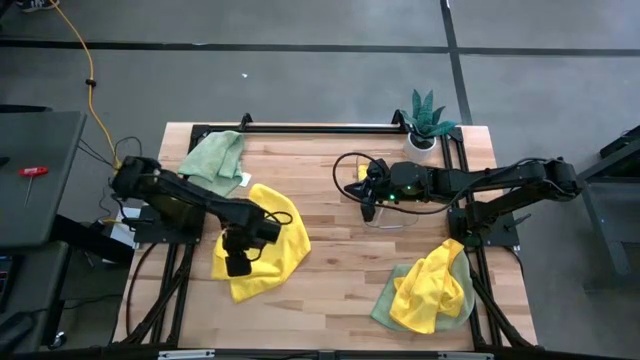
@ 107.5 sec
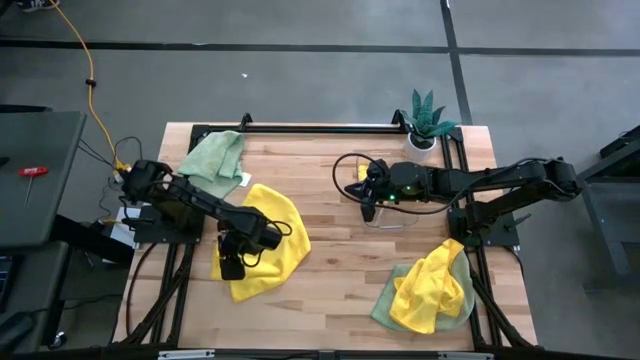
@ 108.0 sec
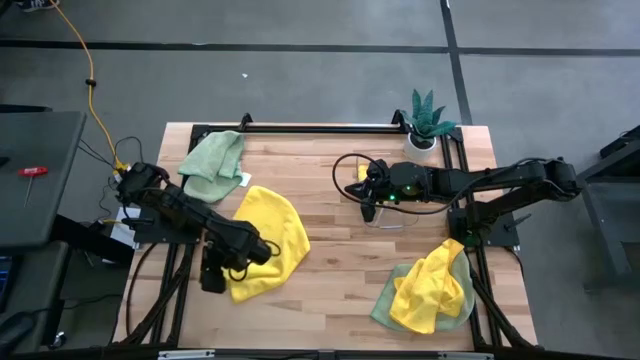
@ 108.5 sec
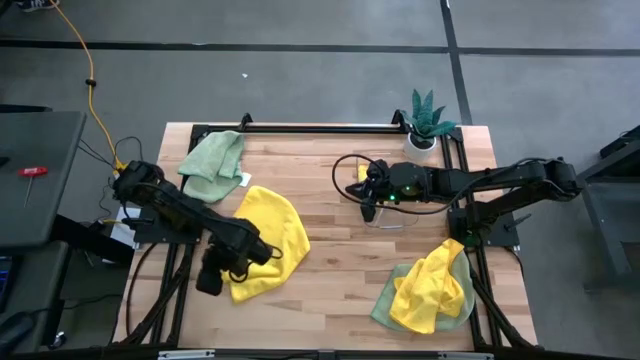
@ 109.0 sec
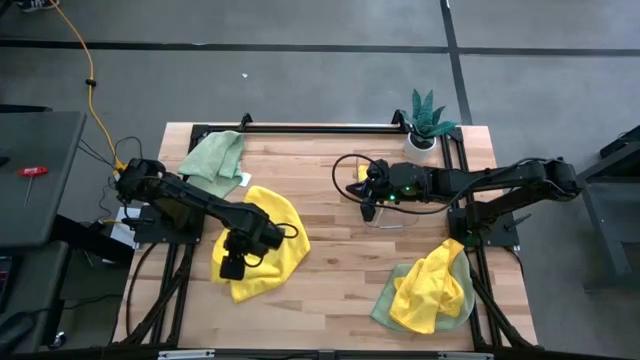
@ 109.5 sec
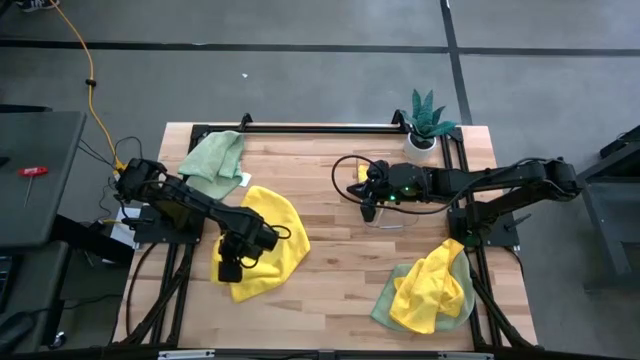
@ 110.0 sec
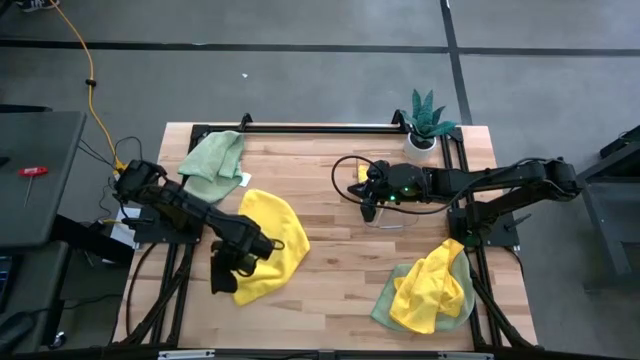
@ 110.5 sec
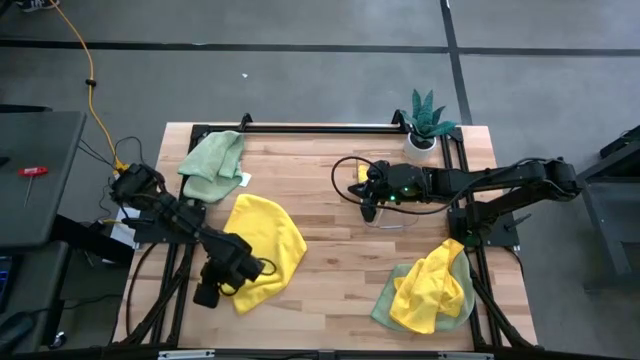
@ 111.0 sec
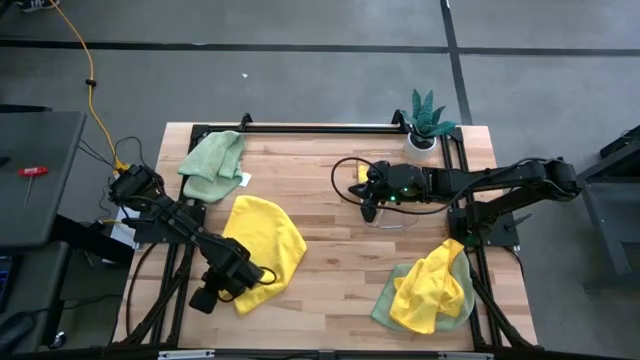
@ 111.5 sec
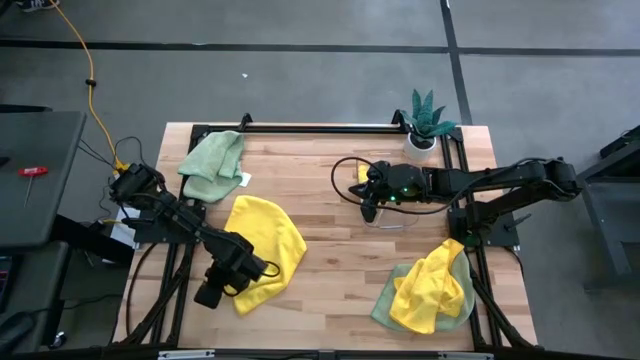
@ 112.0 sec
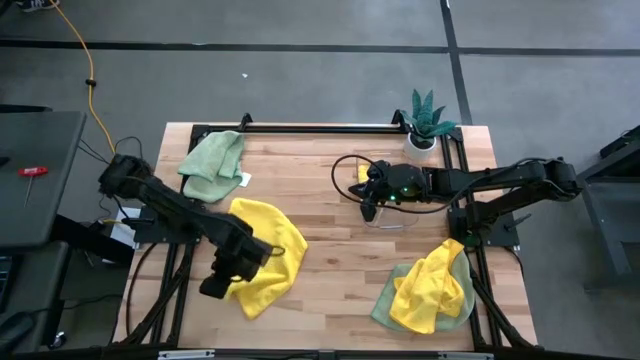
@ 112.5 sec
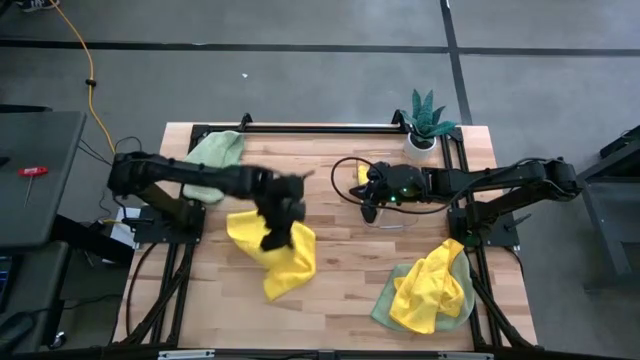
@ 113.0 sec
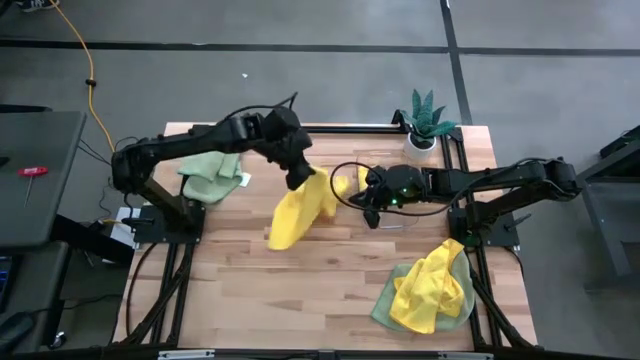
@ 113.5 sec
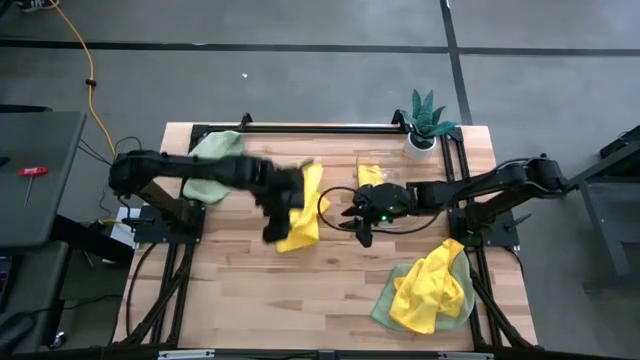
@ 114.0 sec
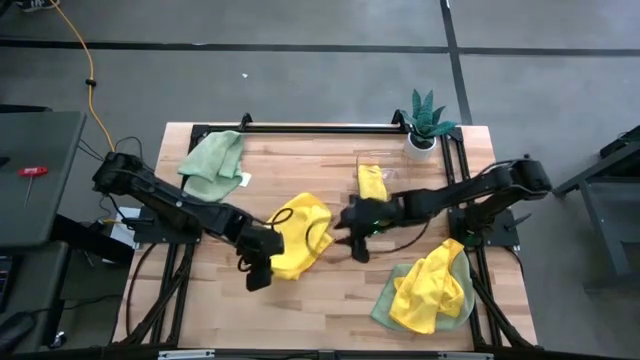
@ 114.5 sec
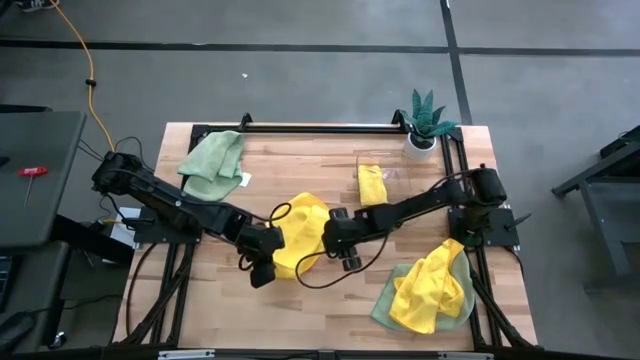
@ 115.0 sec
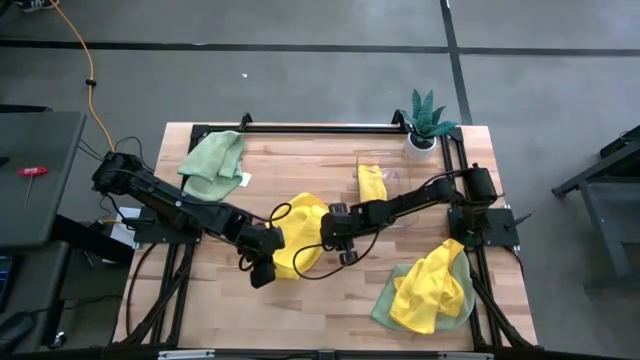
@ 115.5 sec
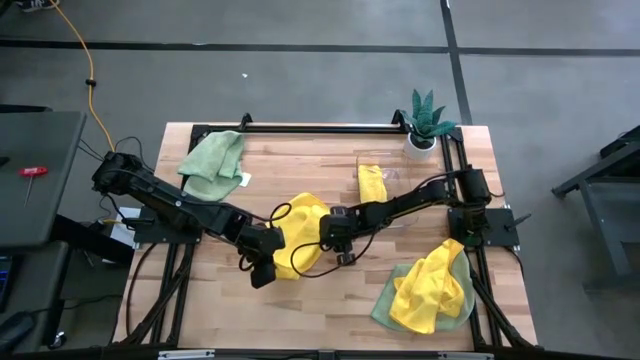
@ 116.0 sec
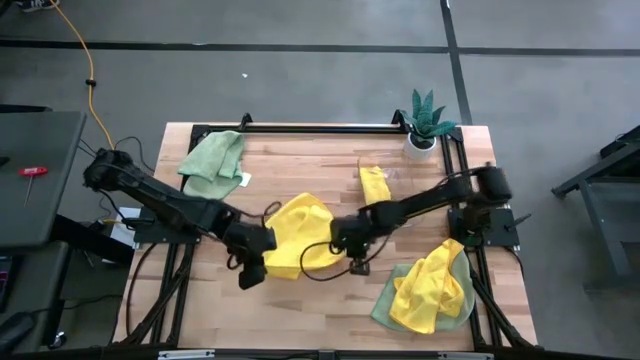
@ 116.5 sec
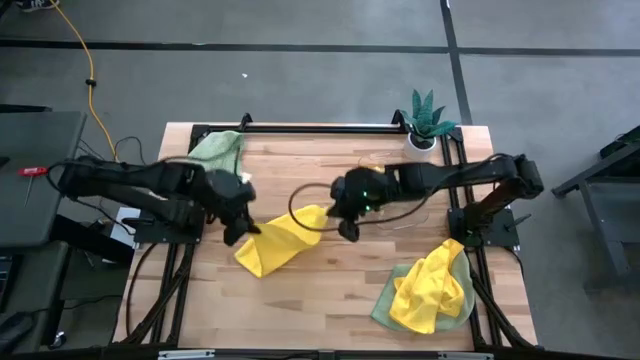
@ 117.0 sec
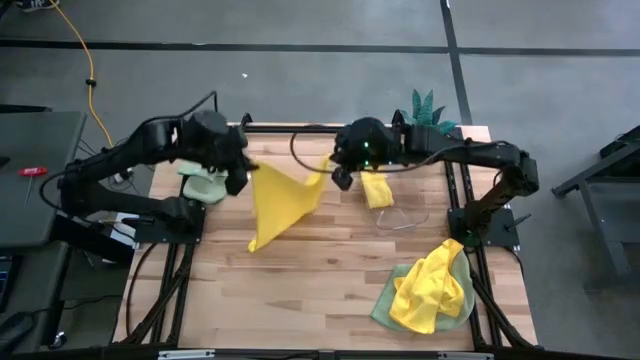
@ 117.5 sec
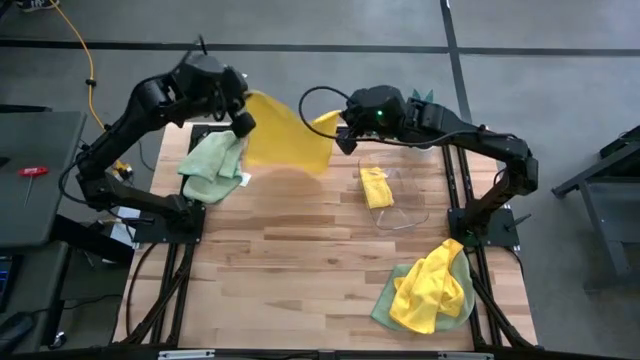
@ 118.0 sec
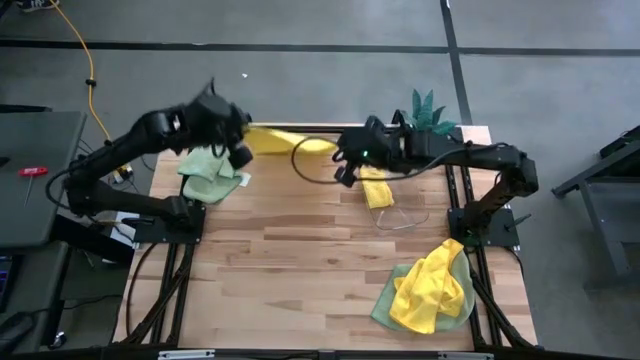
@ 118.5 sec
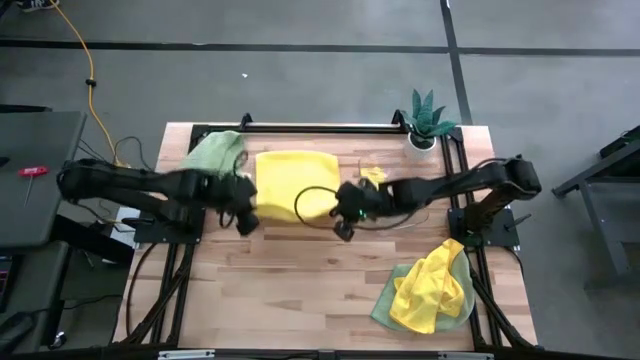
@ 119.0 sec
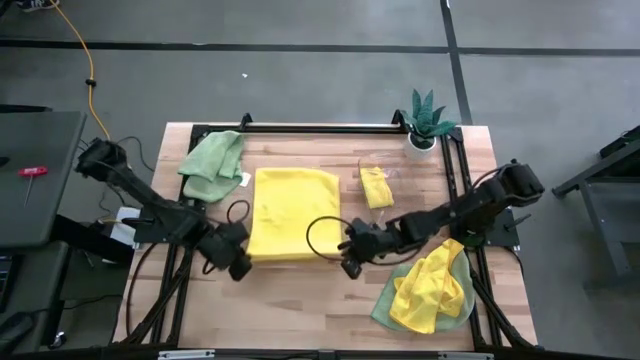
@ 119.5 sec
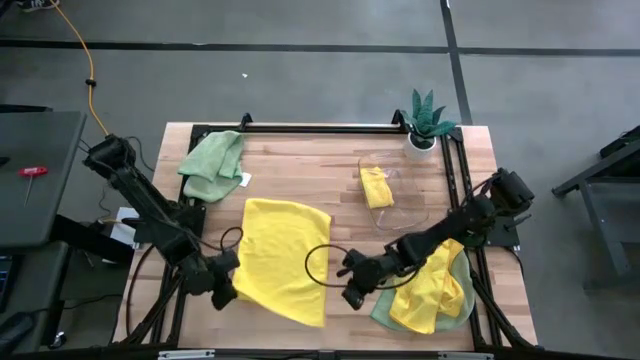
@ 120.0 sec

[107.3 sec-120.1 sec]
Task: Fold microfiber towels
Fold the top yellow microfiber towel

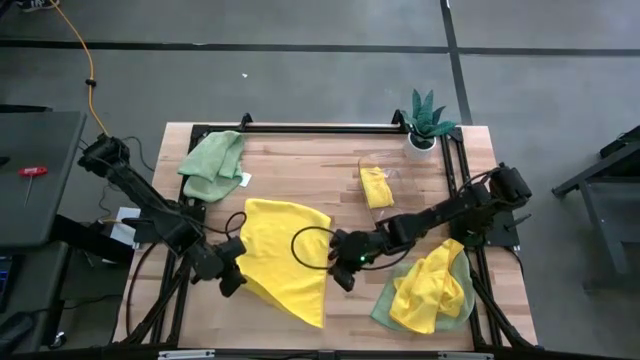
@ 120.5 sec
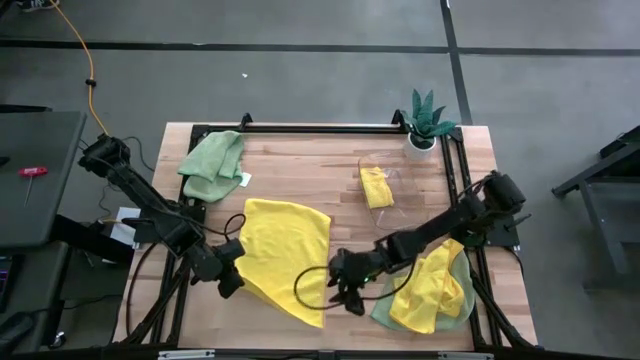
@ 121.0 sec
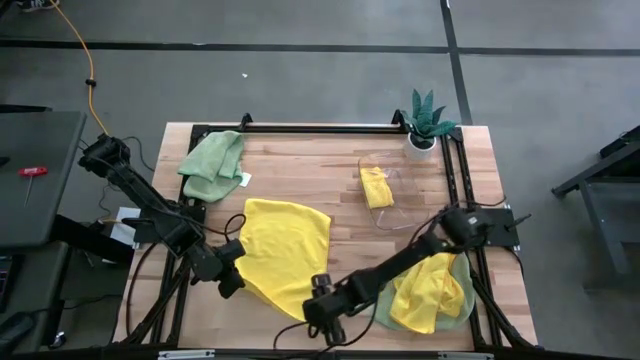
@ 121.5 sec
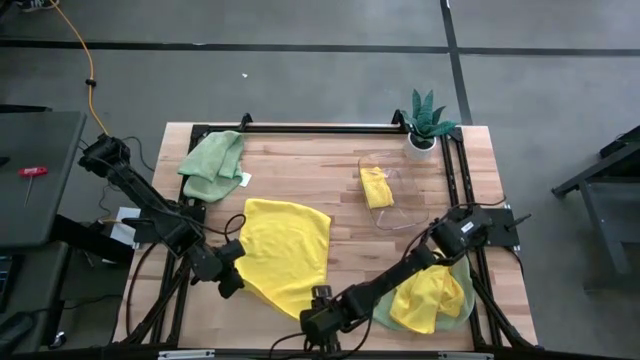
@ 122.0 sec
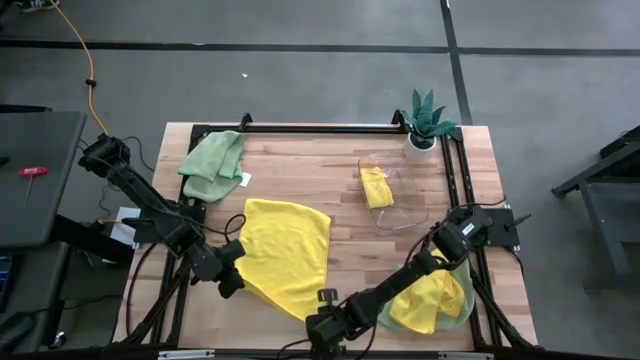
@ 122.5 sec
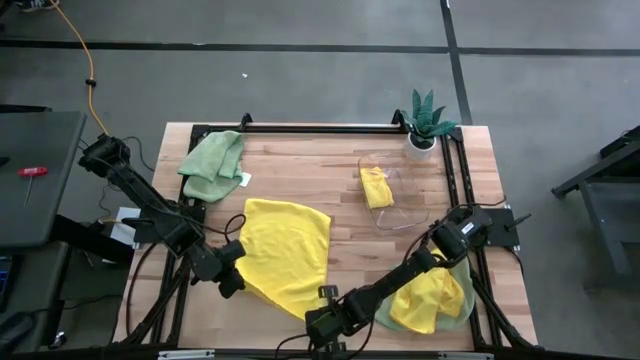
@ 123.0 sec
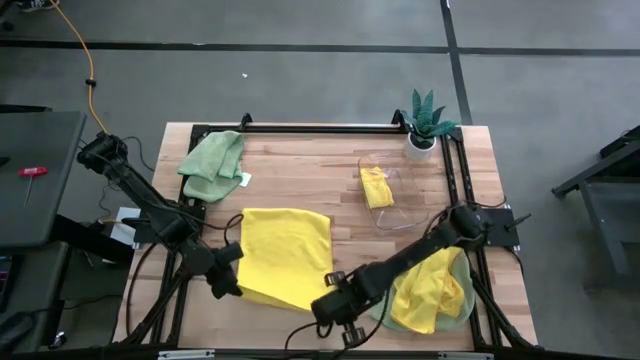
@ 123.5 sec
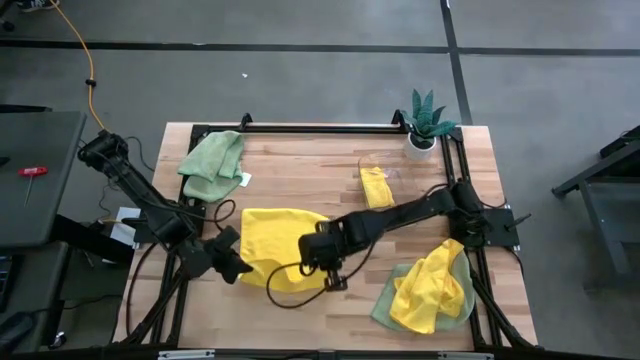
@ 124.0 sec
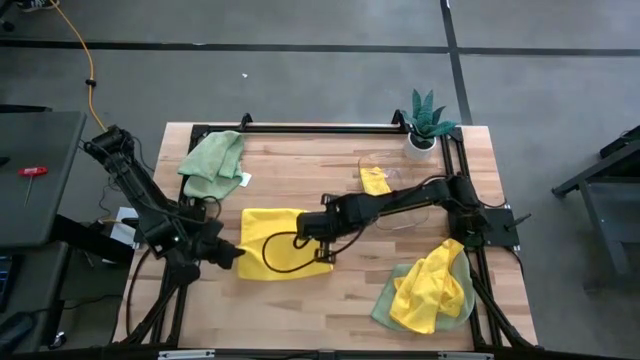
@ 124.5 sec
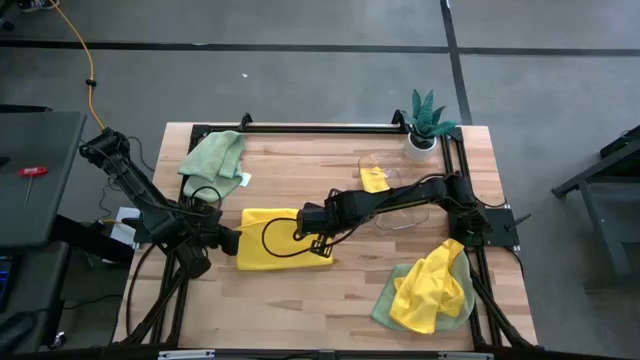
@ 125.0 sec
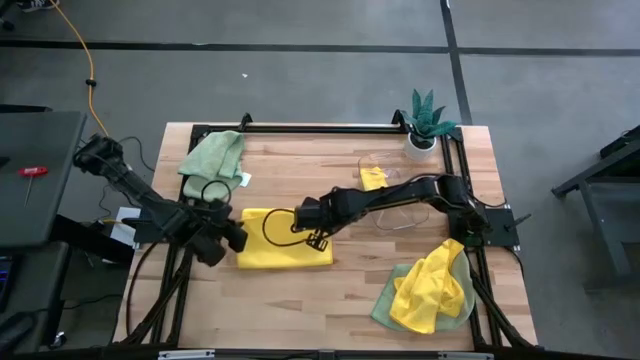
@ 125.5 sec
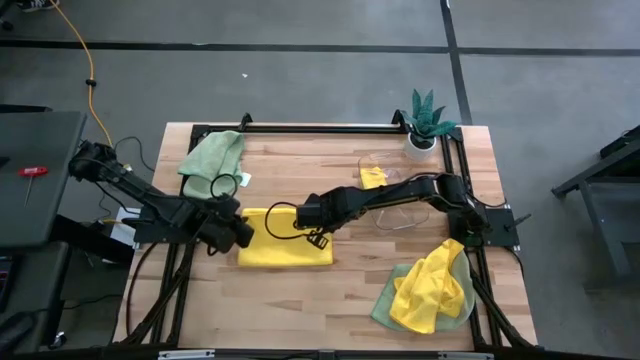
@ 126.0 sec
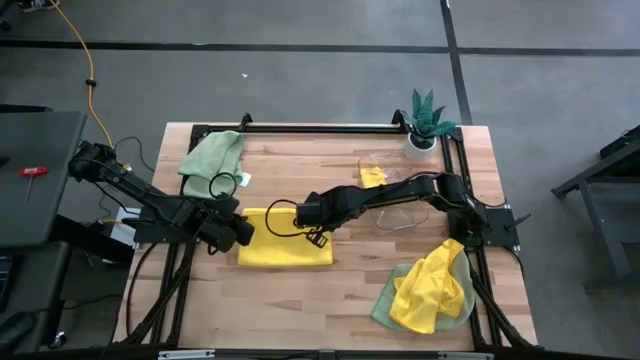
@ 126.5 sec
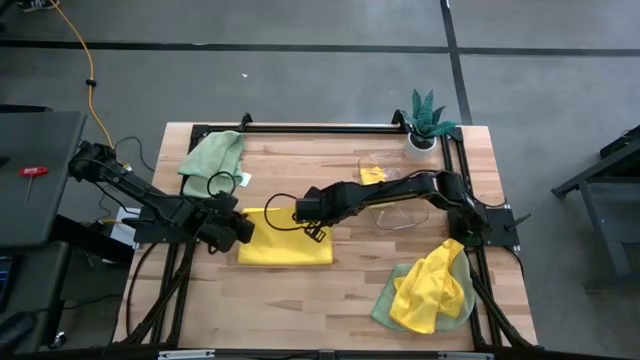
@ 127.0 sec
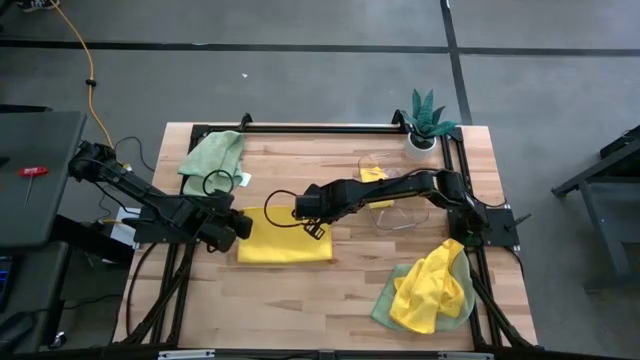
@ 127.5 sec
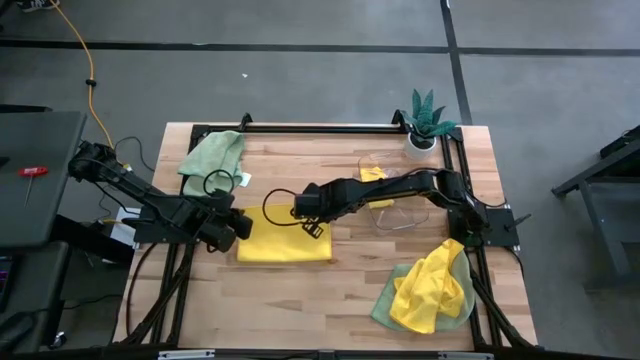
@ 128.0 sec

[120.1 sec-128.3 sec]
Fold the top yellow microfiber towel

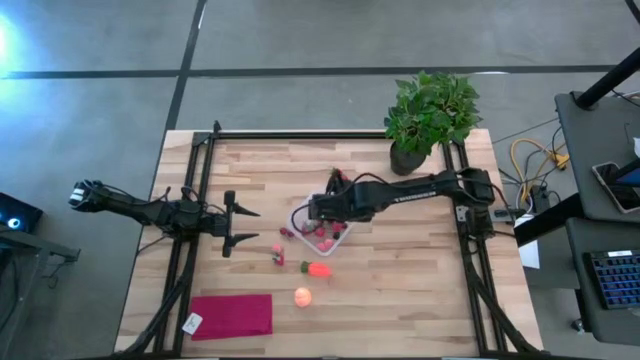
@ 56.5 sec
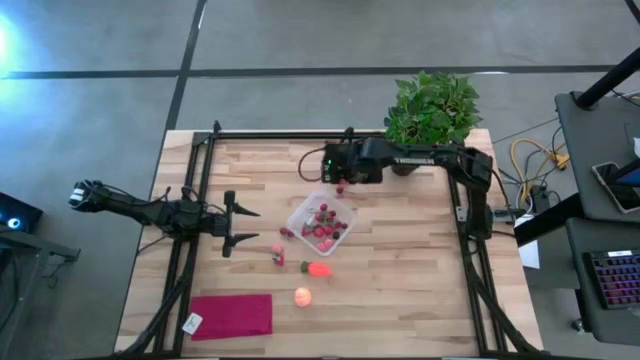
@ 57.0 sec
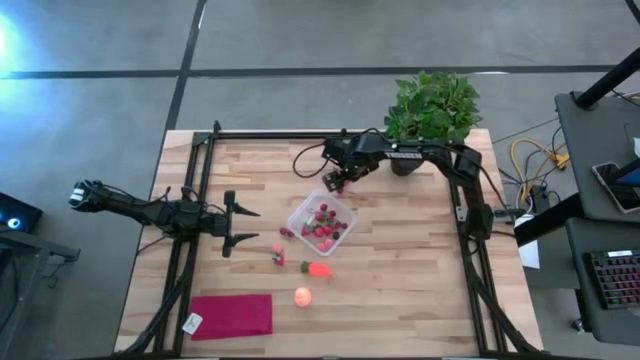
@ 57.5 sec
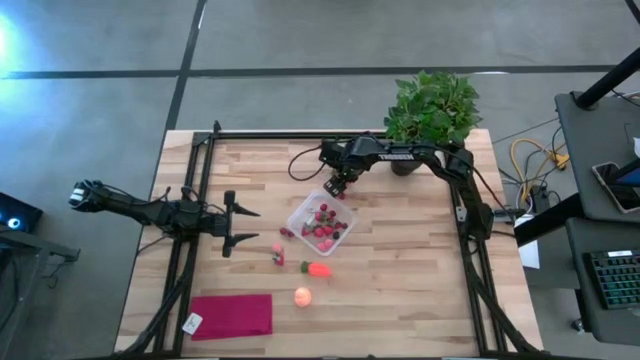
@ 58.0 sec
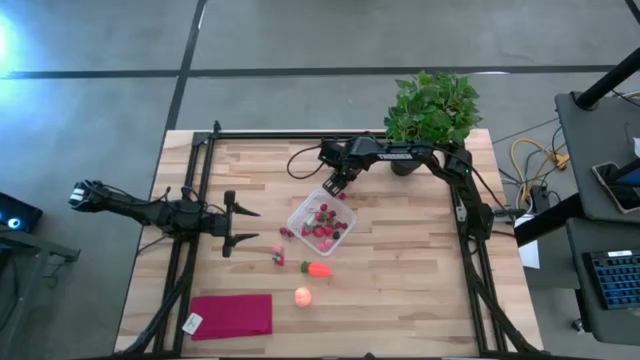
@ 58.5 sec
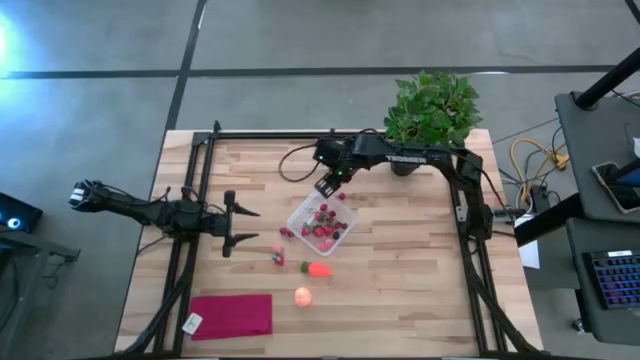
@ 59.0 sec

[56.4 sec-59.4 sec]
Task: Pick and placing Produce into tupperware
Put the red strawberry into the transparent container
